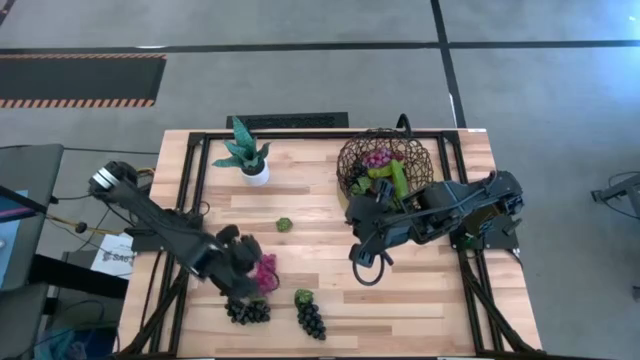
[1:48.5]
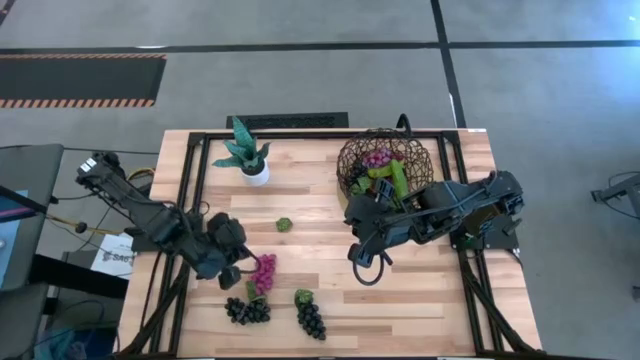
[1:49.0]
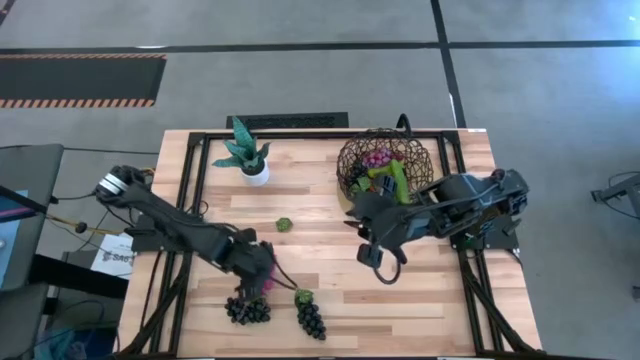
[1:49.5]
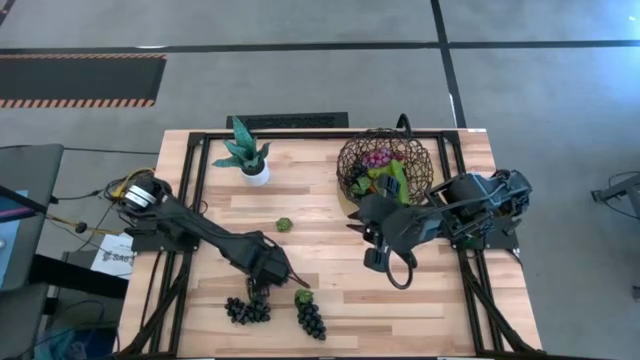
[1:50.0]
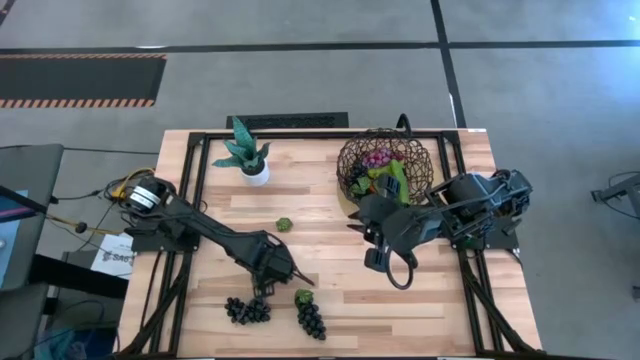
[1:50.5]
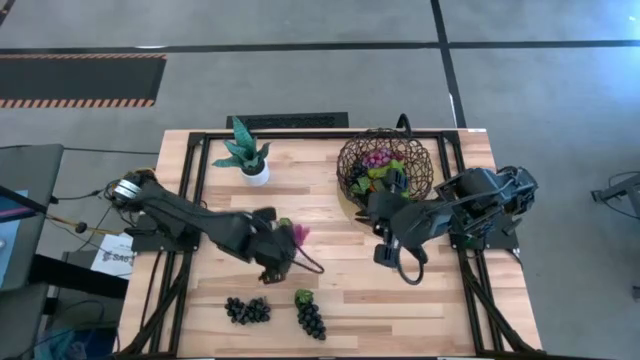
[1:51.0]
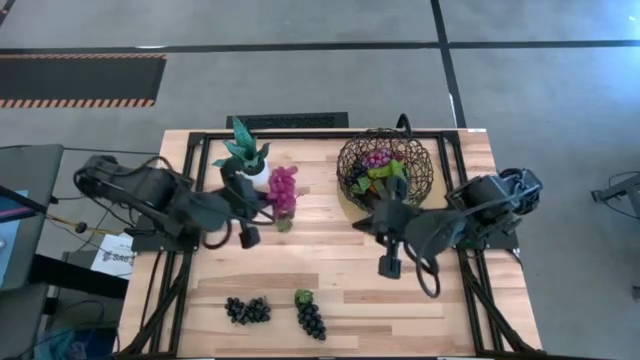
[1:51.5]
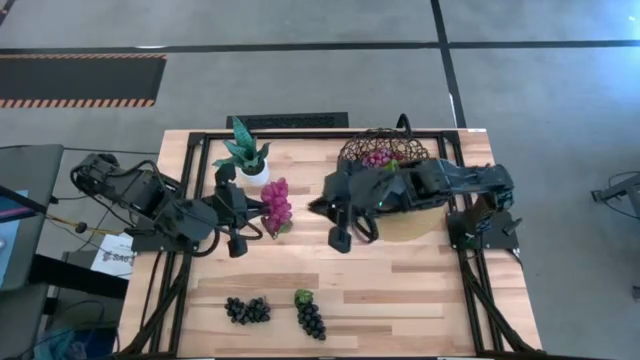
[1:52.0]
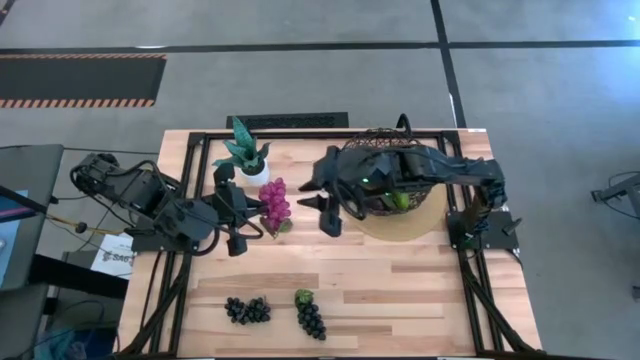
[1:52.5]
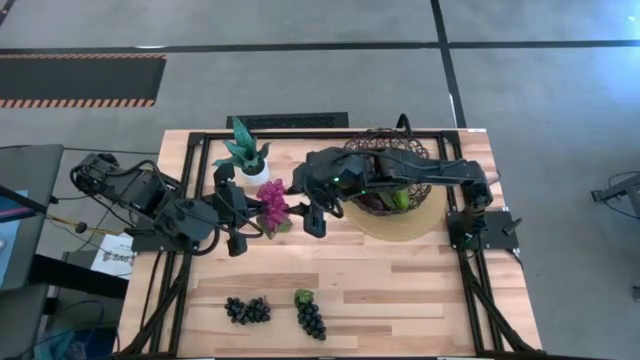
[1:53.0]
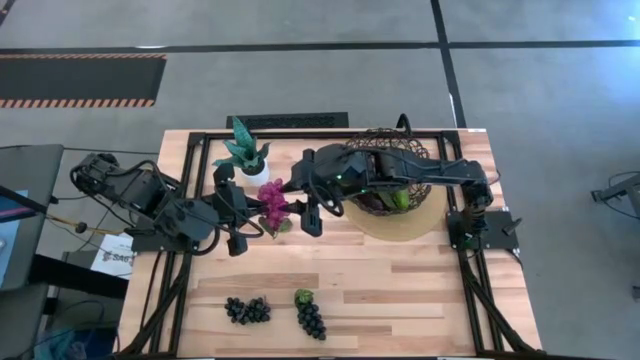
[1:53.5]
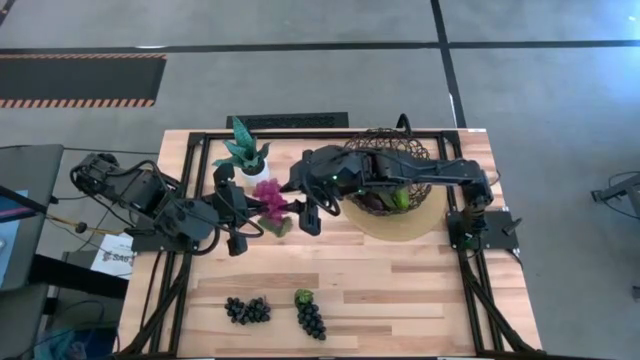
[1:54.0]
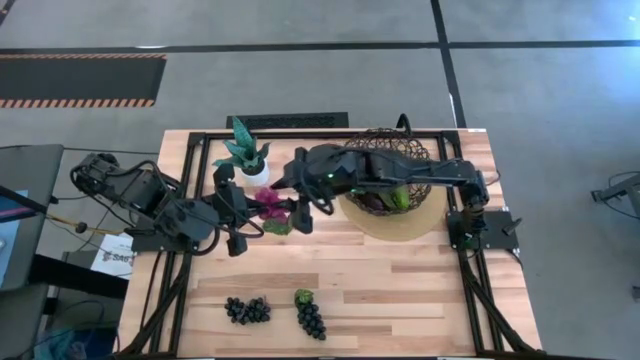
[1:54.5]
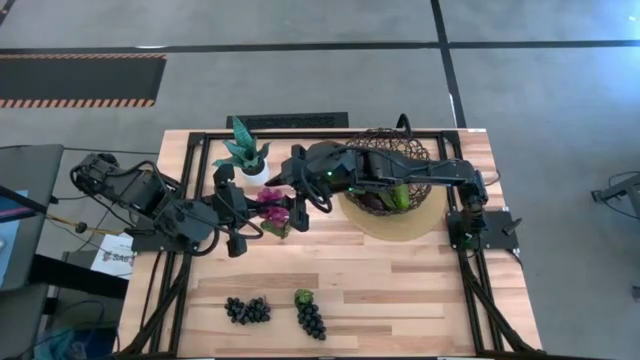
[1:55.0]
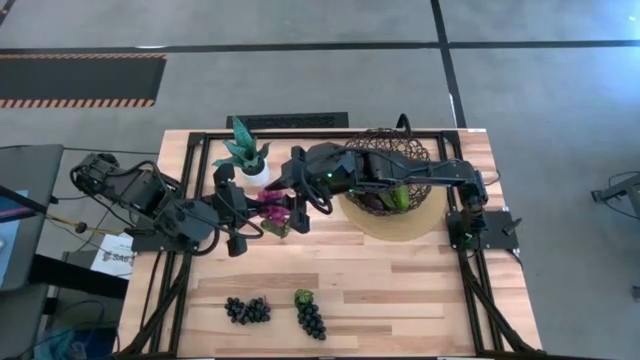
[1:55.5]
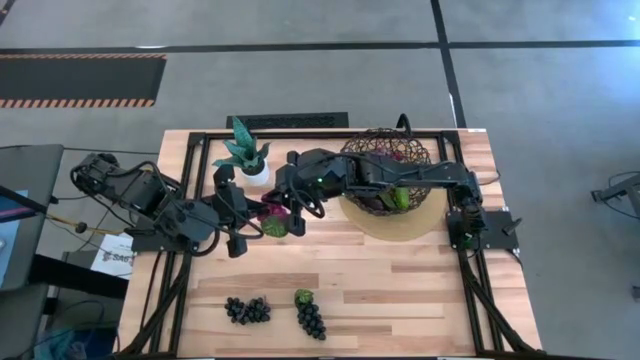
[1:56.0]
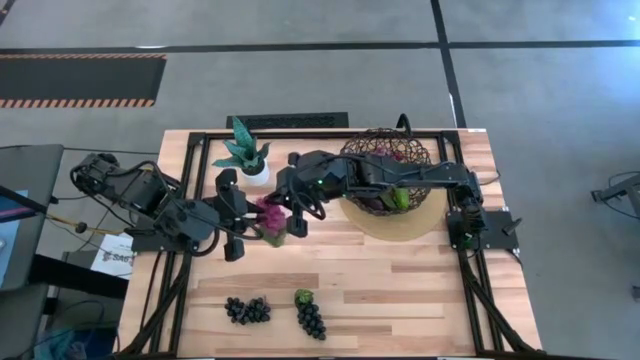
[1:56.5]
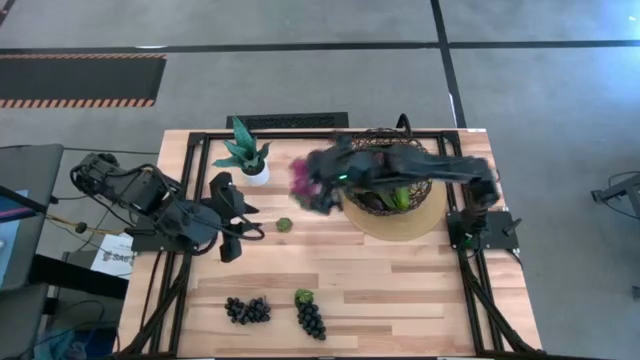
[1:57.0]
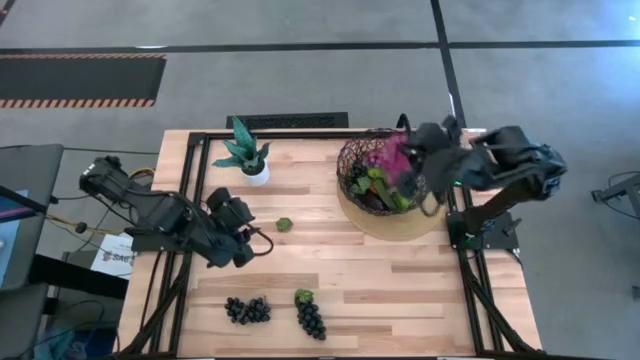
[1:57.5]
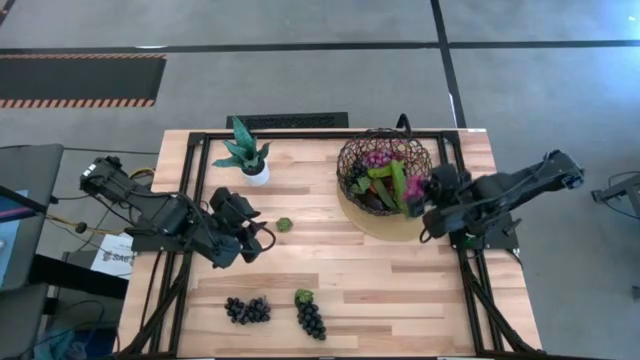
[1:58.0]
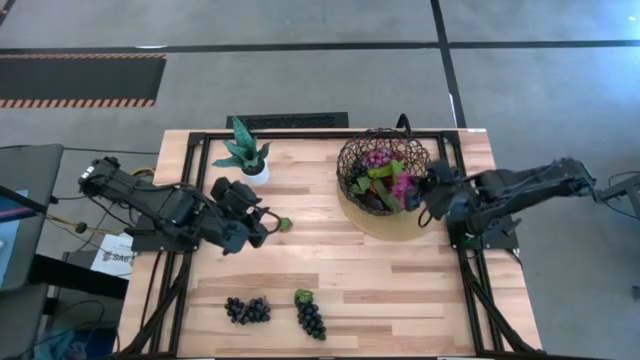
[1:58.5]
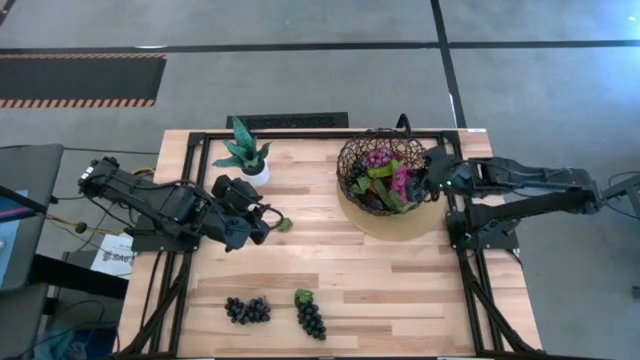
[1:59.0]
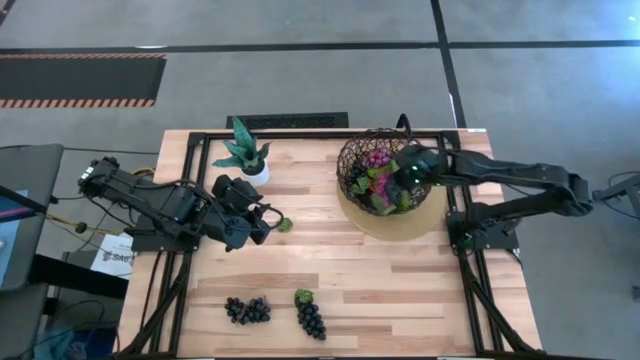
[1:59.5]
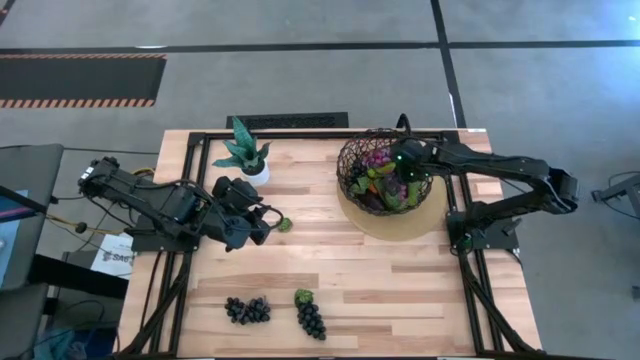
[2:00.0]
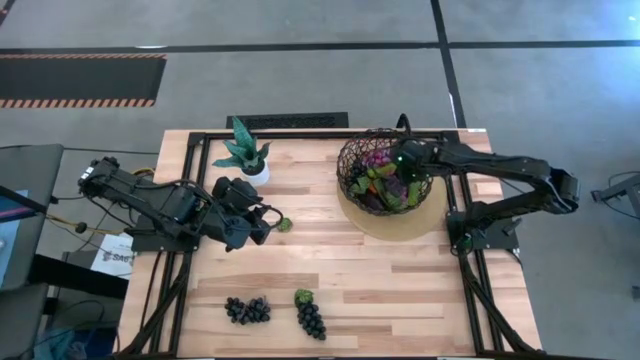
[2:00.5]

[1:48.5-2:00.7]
Task: Build produce basket
Put the purple grapes into the black wire basket

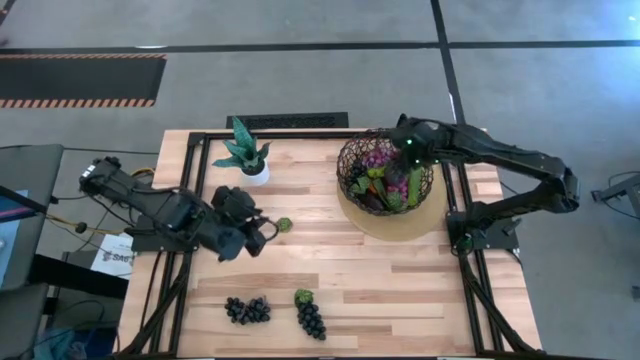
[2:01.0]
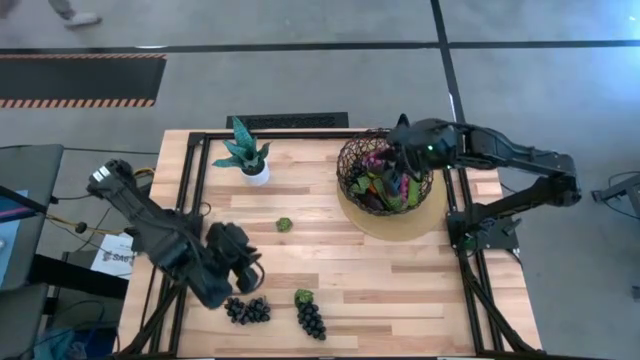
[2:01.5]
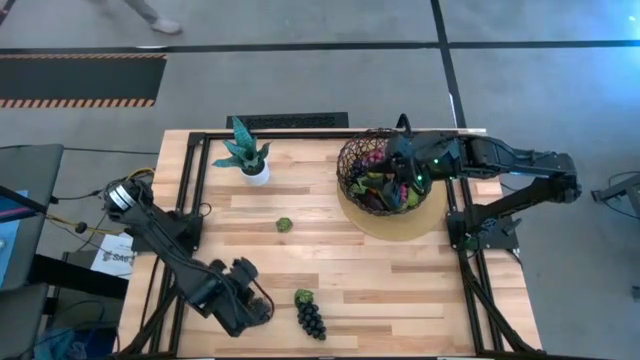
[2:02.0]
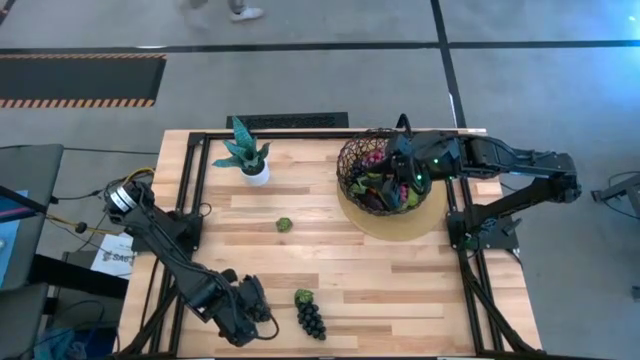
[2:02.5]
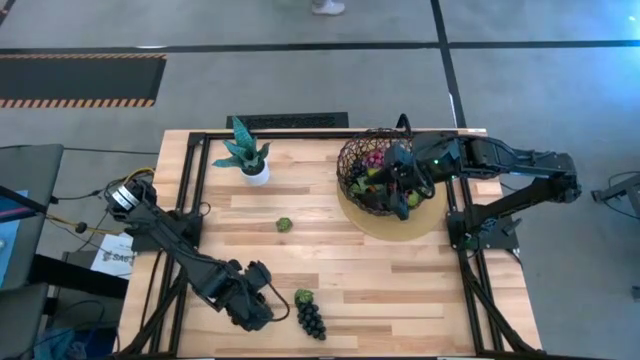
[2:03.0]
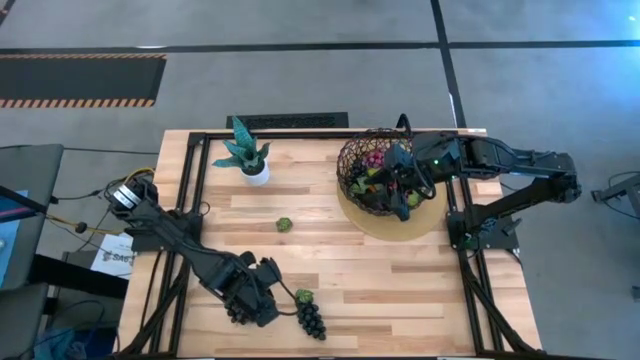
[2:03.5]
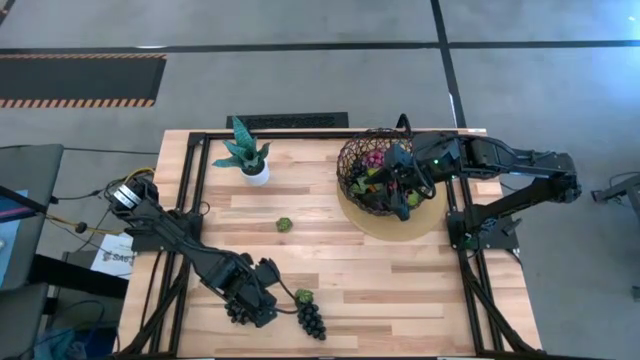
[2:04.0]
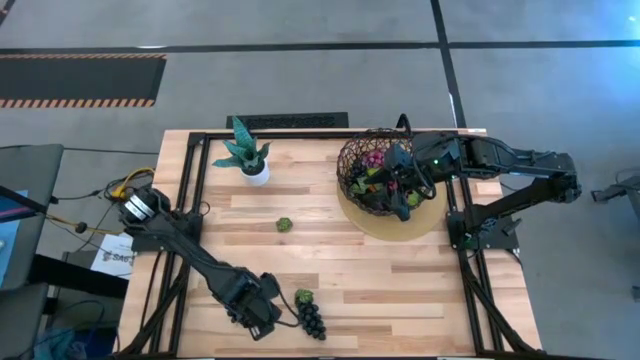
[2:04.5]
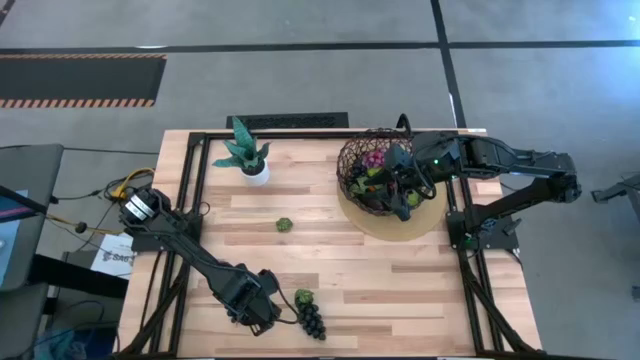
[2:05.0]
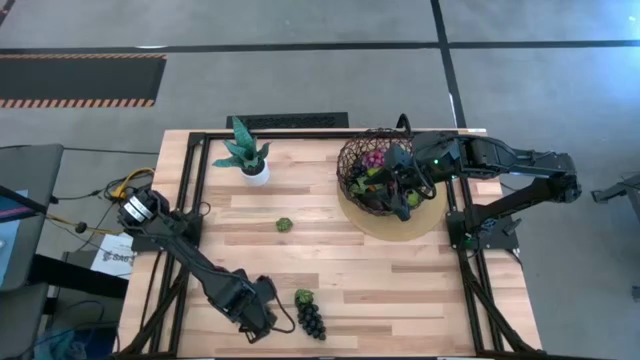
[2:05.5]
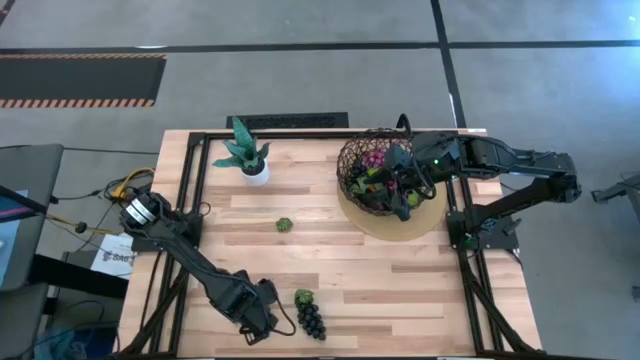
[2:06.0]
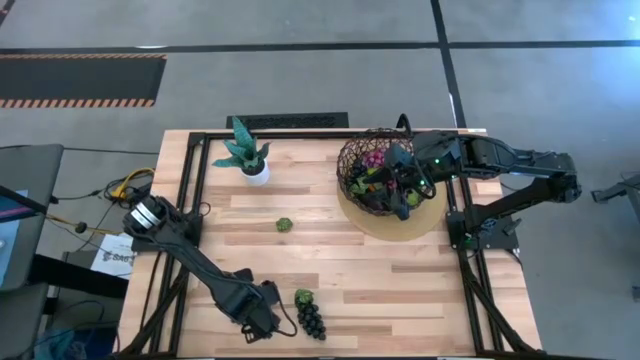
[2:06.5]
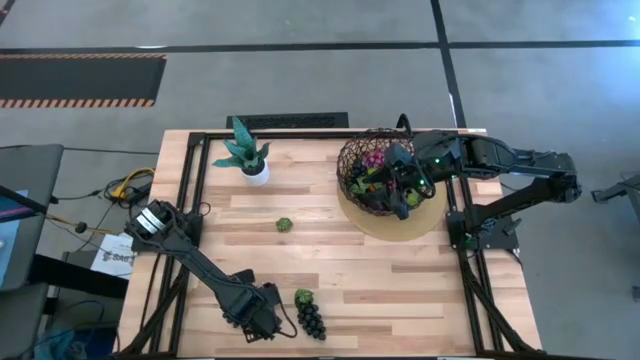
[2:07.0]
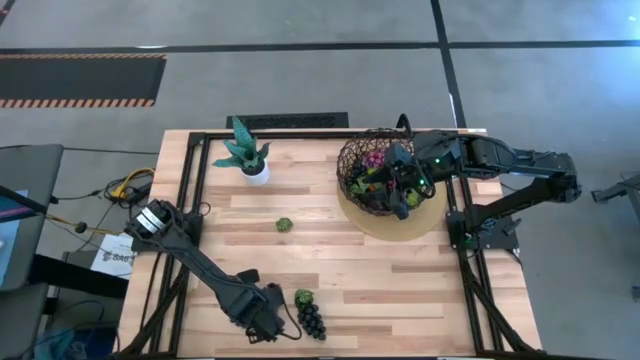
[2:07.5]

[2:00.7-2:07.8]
Put the black grapes into the black wire basket
